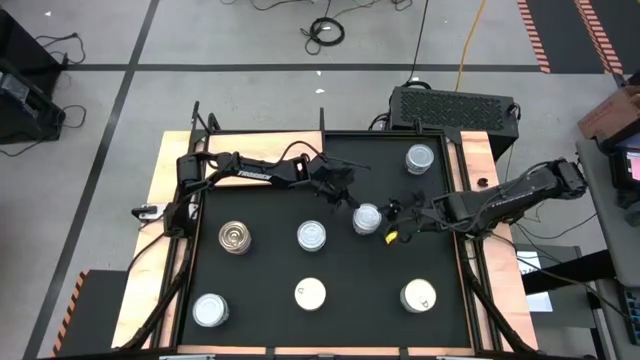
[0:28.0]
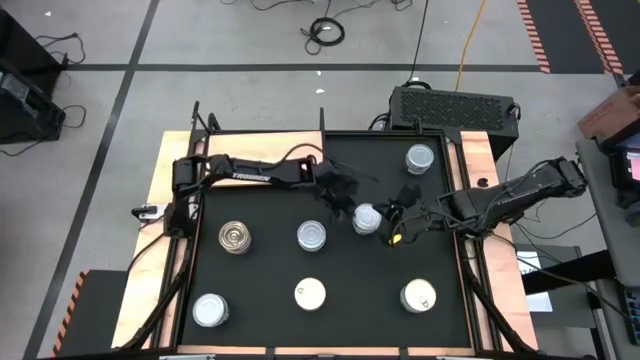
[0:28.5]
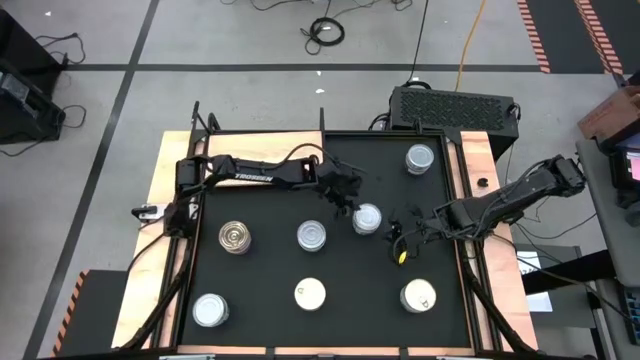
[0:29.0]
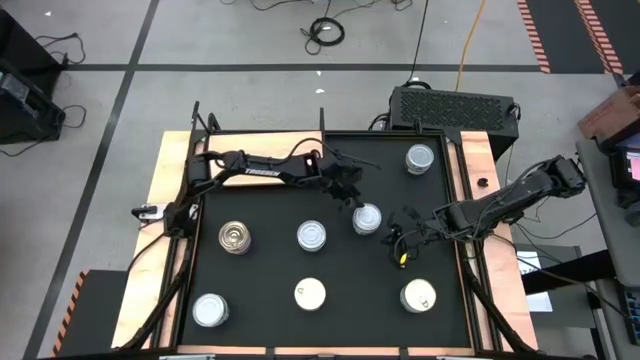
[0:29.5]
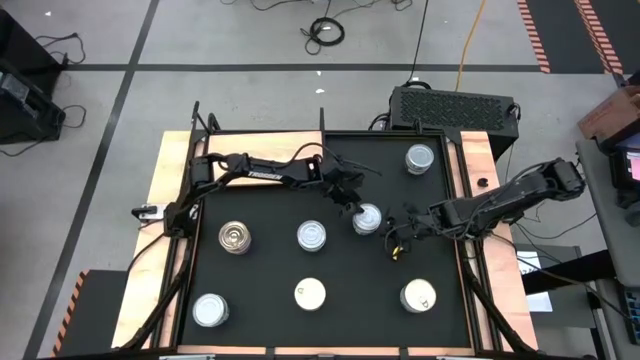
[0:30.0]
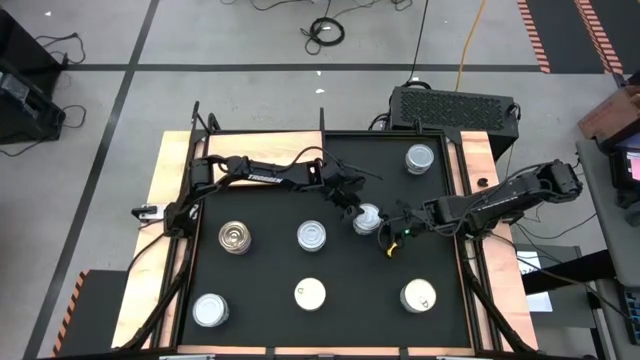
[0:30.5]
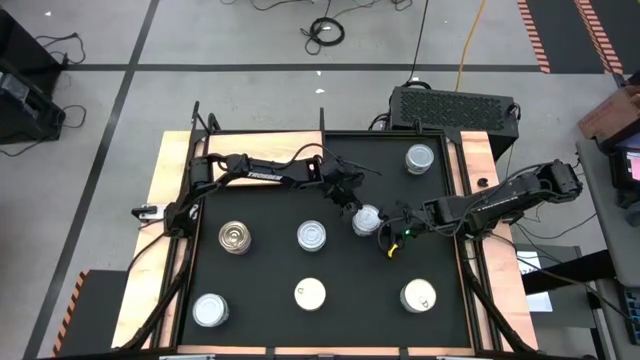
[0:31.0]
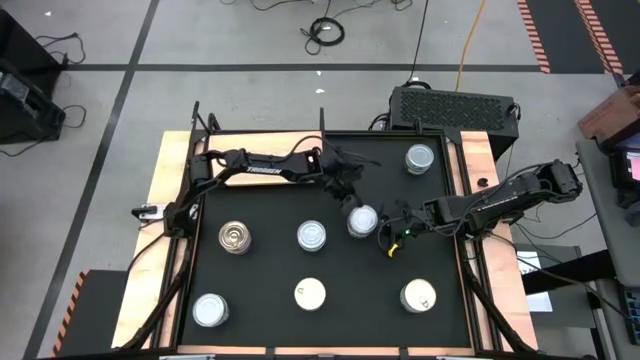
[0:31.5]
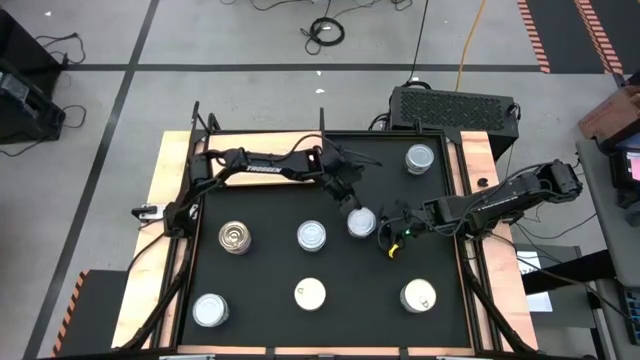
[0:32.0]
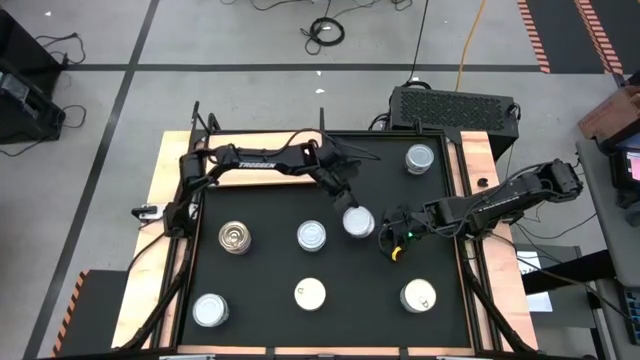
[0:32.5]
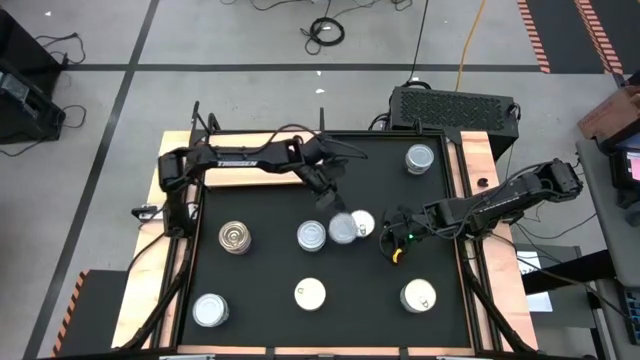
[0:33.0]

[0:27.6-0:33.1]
Task: Stack canned seafood by type on shelf
Remove the green and white tuna can from the blue and pink tuna can on the table

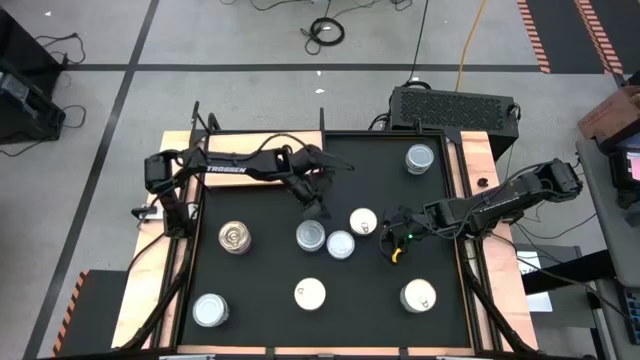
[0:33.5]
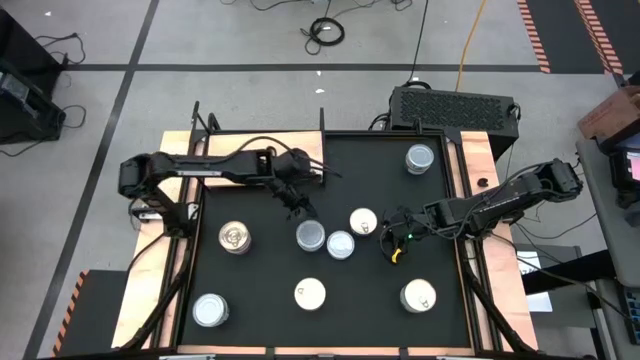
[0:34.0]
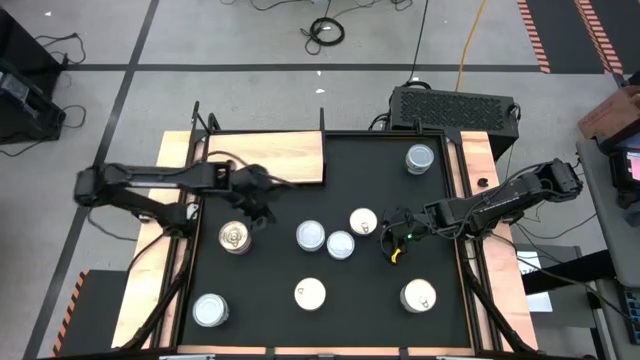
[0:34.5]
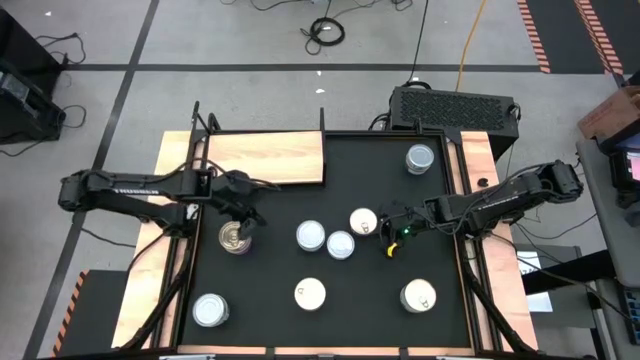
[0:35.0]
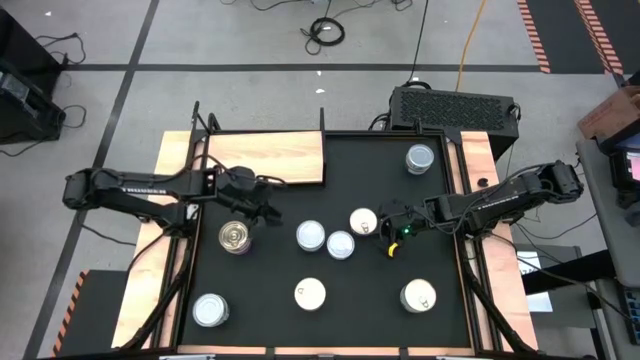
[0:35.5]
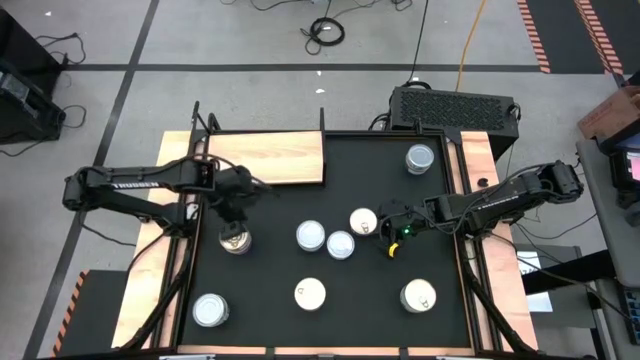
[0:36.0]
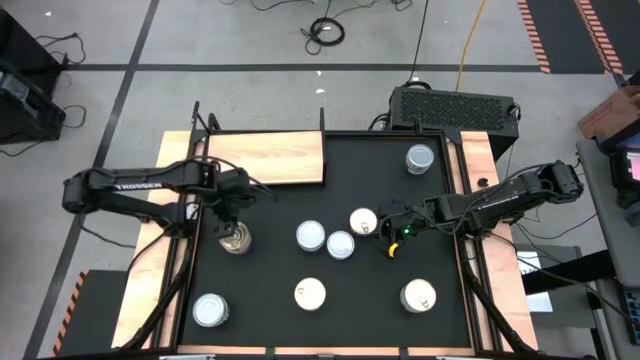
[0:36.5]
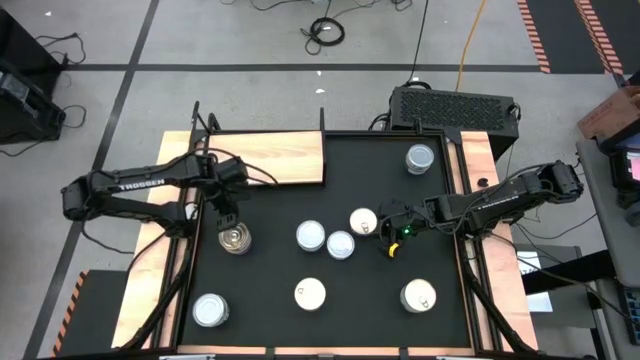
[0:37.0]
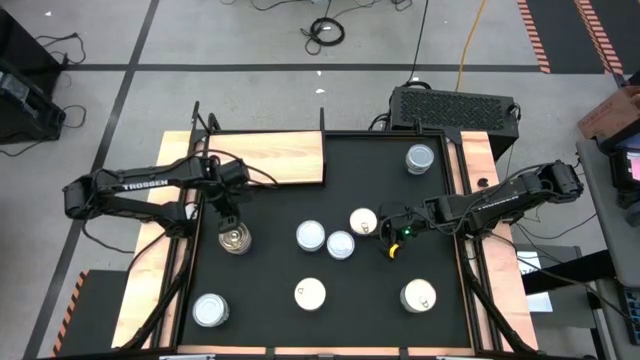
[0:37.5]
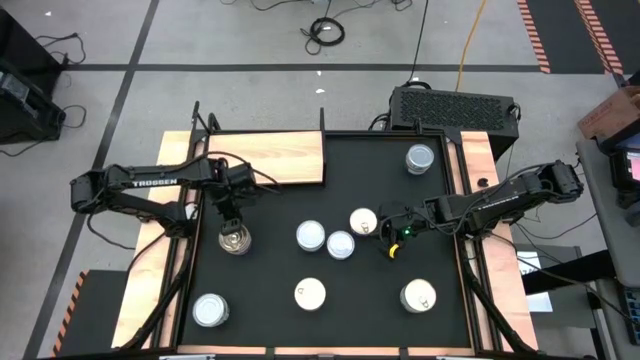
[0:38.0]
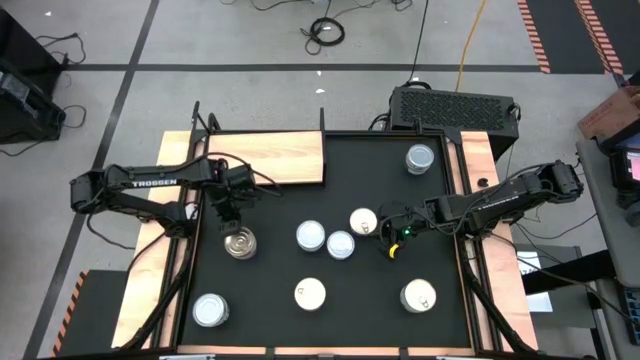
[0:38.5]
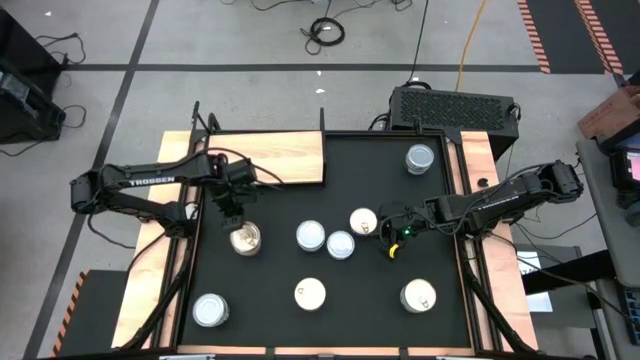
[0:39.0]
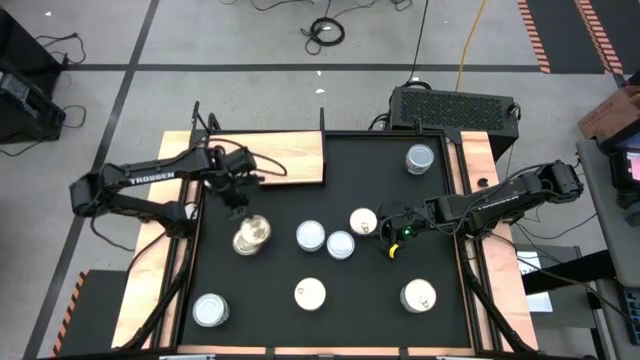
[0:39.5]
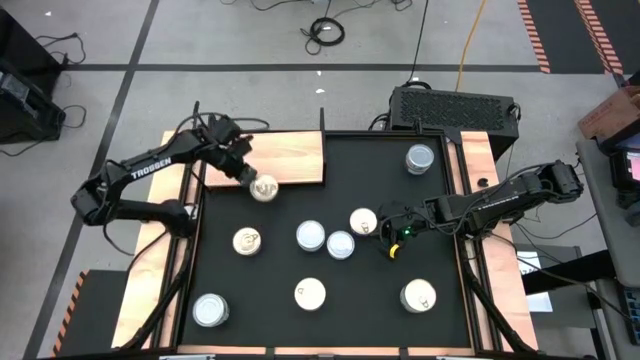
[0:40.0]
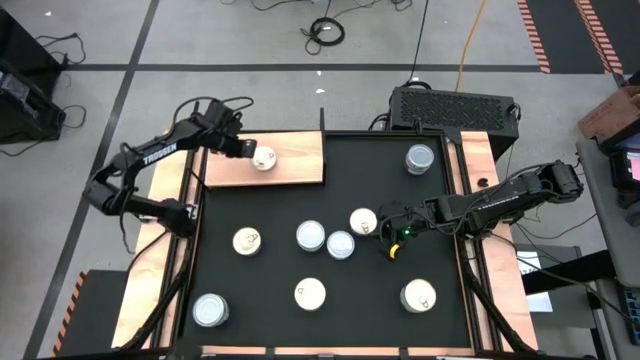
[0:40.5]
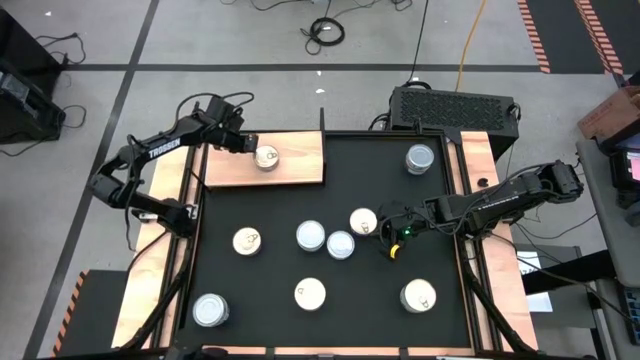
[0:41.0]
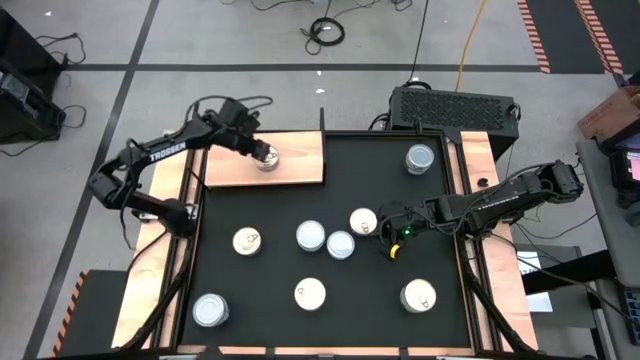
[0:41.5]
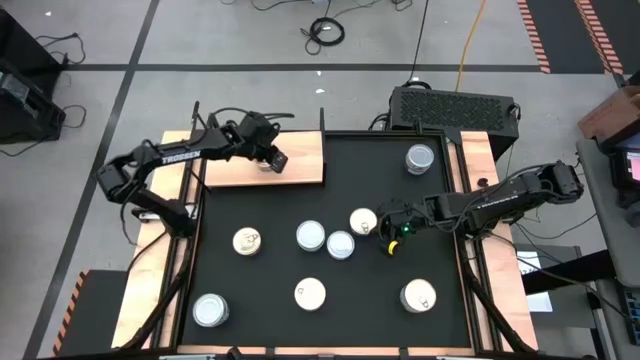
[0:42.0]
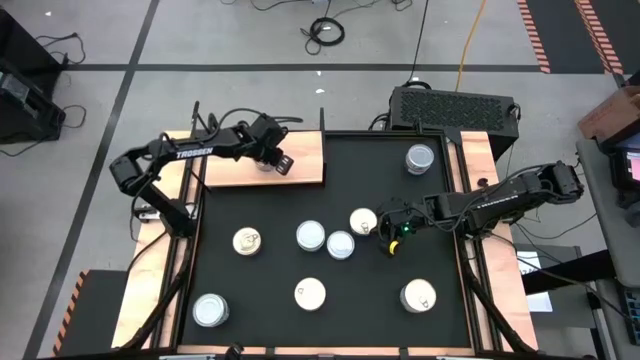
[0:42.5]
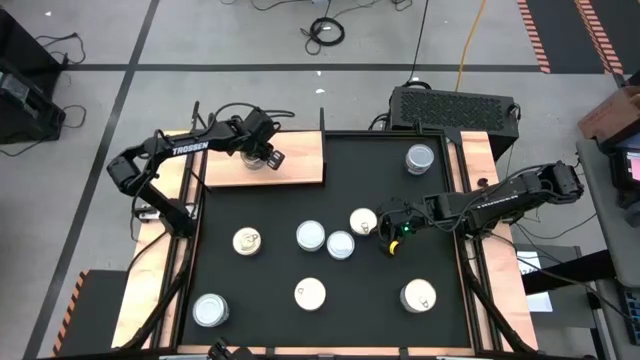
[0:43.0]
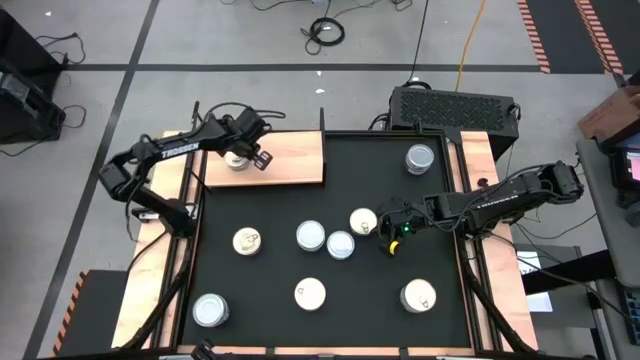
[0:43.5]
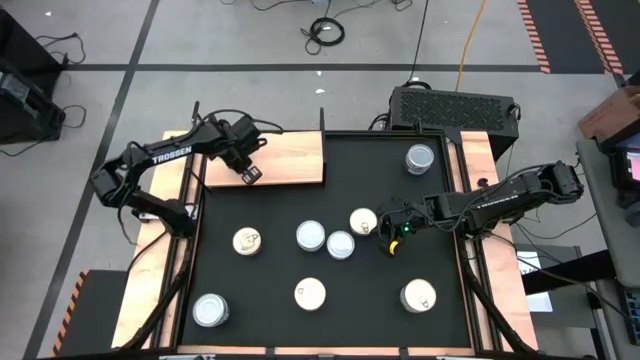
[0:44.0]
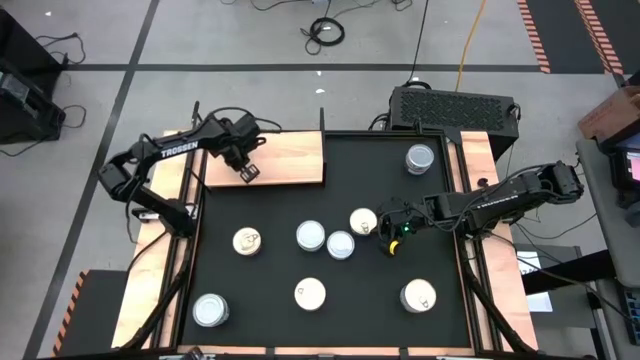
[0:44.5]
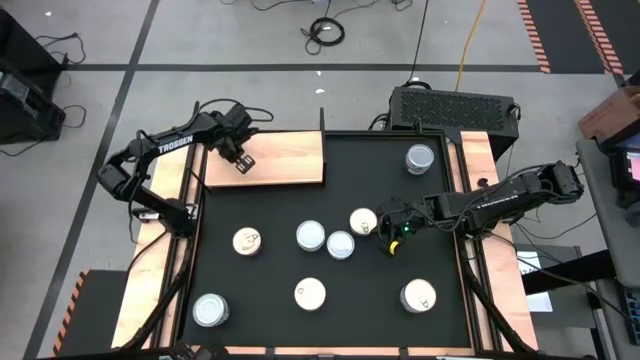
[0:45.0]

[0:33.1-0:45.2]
Put the blue and pink tuna can on the shelf

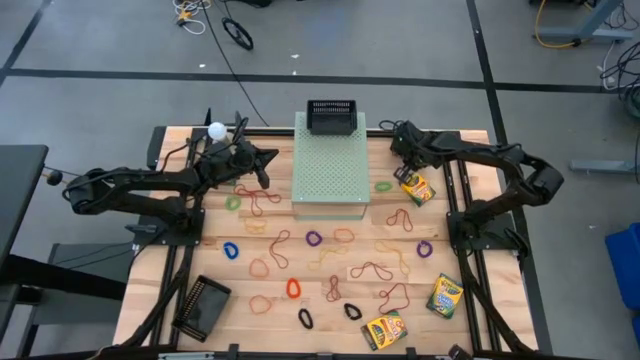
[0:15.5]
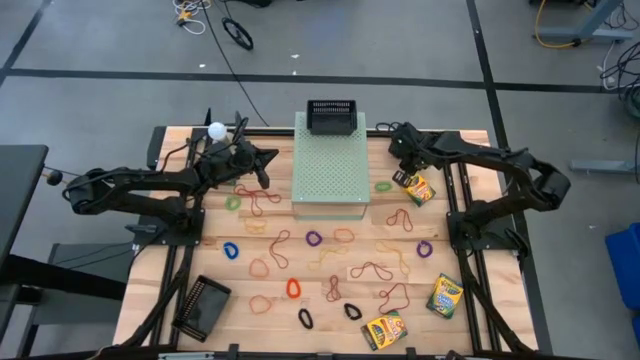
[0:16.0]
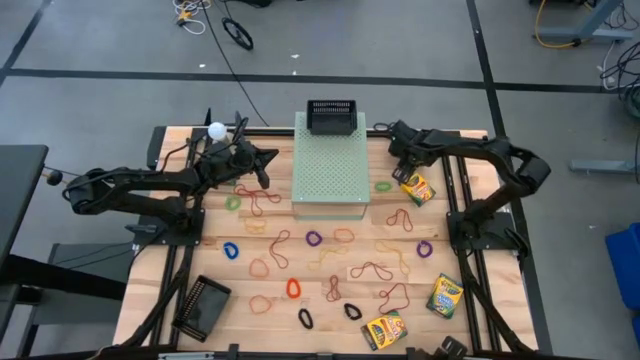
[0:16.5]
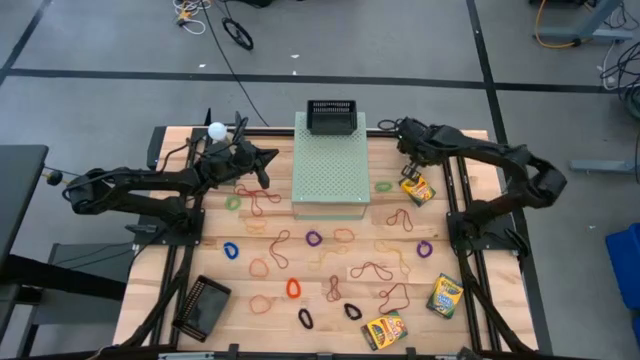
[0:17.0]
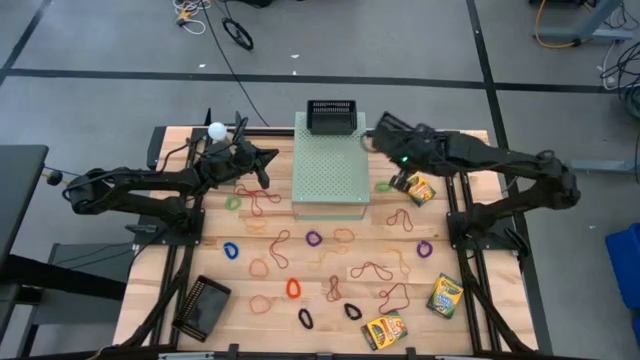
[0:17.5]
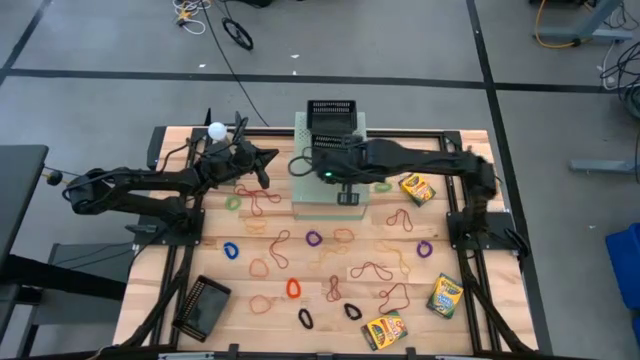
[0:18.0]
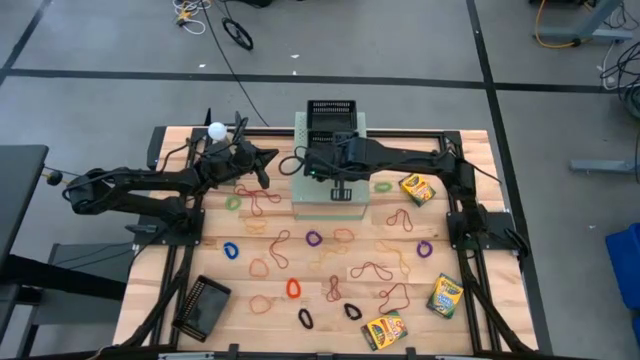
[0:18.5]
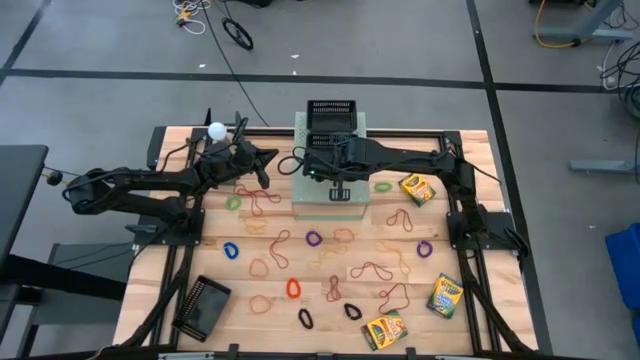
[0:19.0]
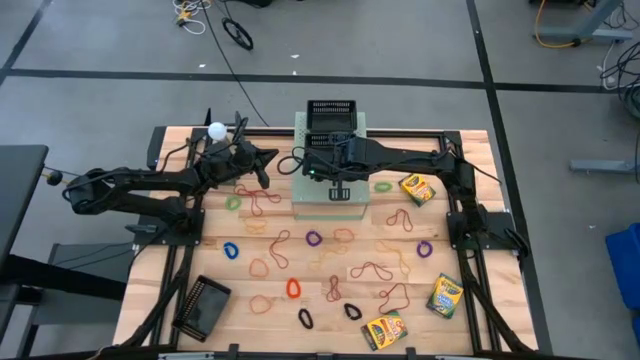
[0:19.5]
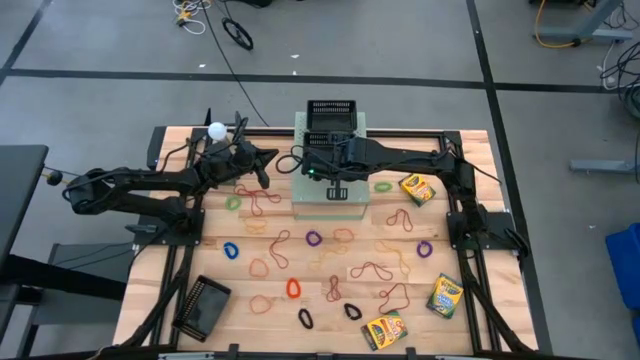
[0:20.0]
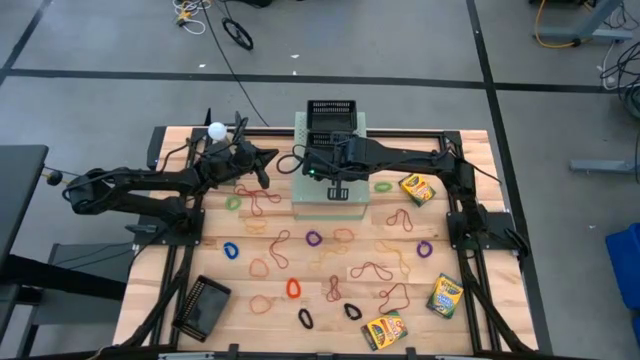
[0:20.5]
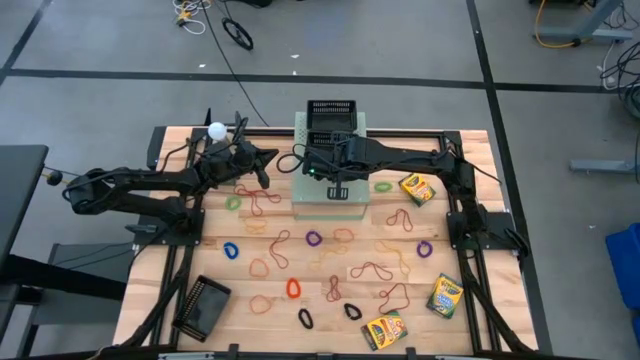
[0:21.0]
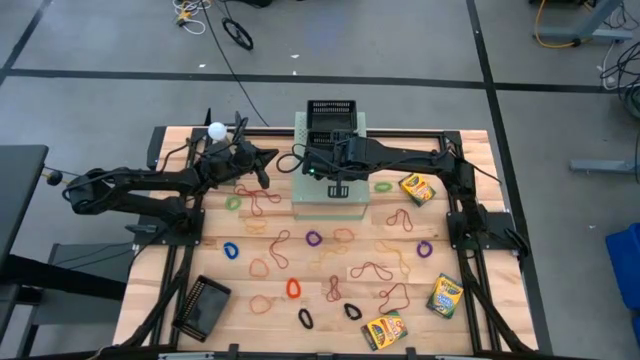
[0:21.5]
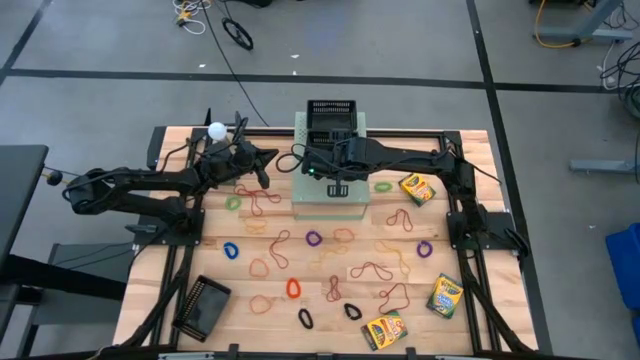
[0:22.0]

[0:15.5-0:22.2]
Task: Pick & Place Office Desk Supplies
Put the top black bin on the shelf aligned with the other black bin
